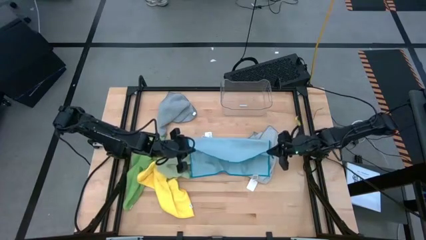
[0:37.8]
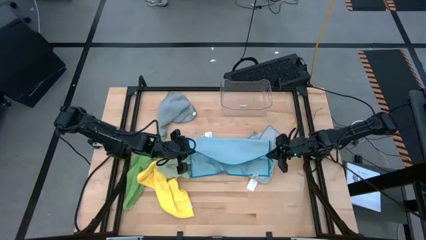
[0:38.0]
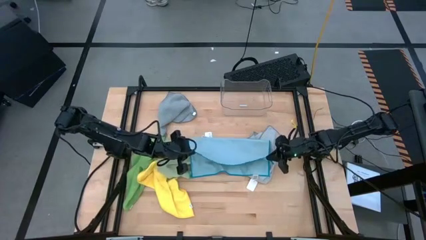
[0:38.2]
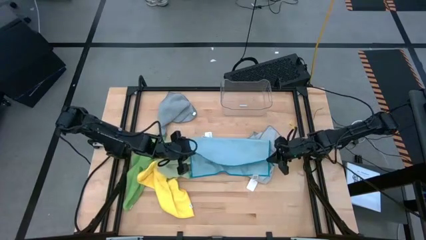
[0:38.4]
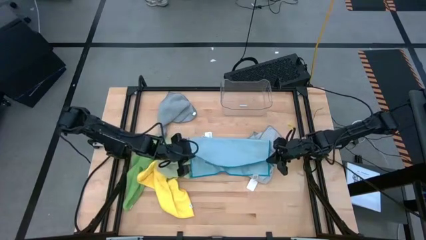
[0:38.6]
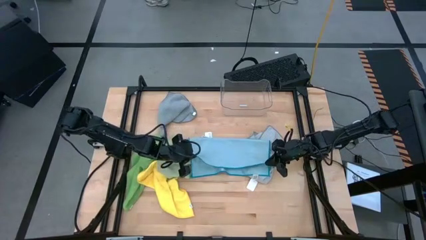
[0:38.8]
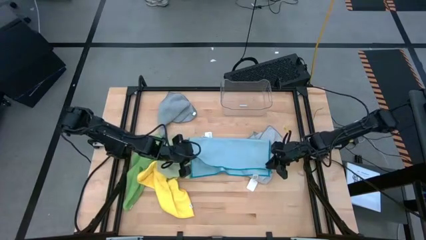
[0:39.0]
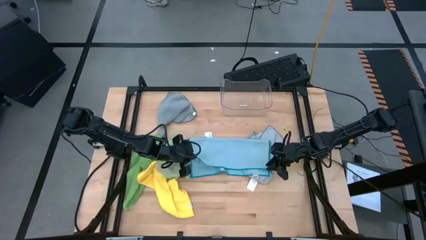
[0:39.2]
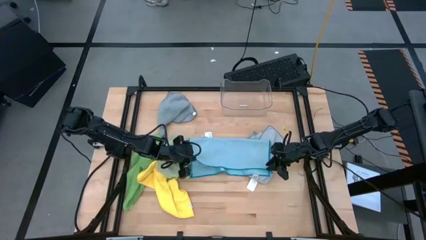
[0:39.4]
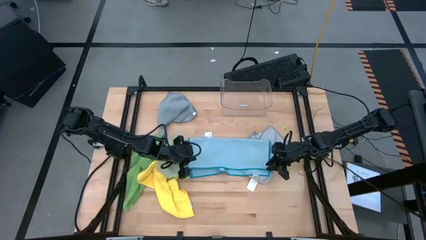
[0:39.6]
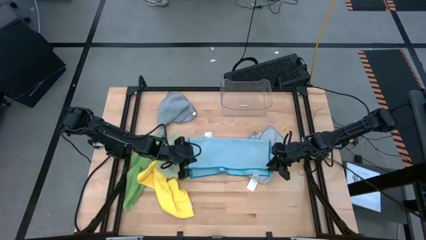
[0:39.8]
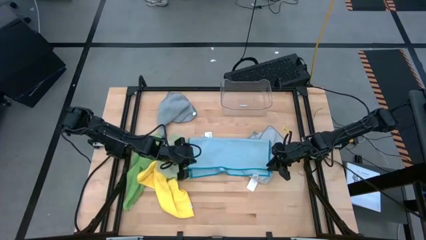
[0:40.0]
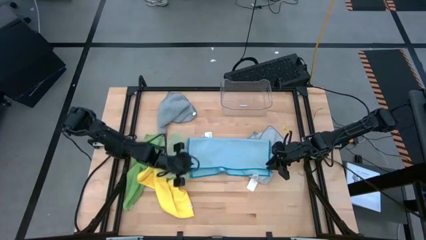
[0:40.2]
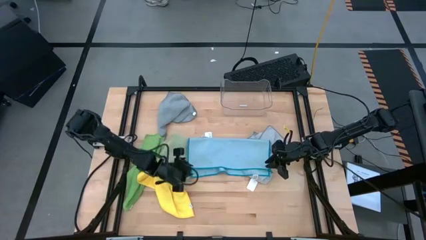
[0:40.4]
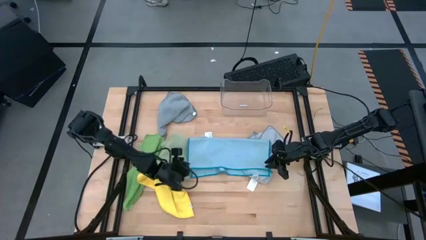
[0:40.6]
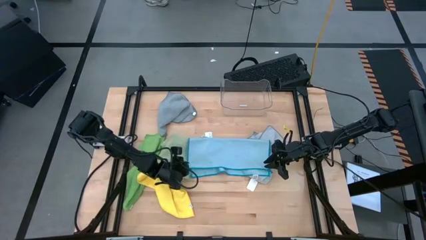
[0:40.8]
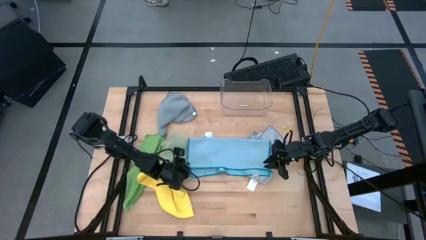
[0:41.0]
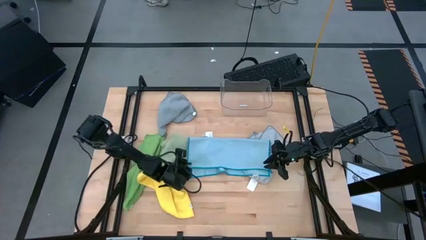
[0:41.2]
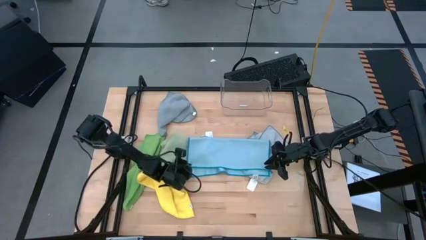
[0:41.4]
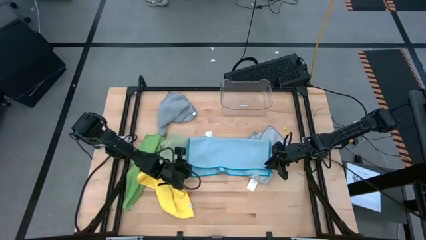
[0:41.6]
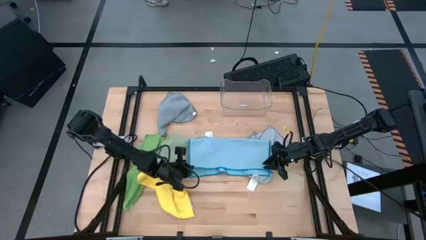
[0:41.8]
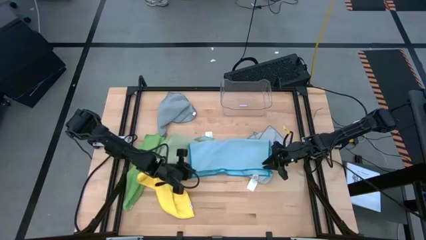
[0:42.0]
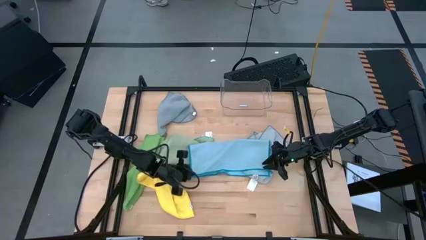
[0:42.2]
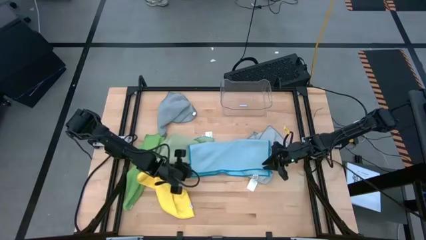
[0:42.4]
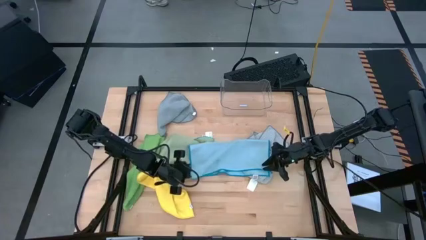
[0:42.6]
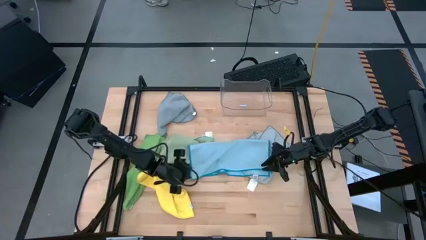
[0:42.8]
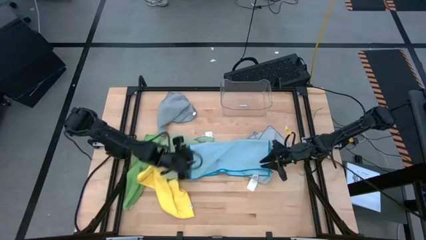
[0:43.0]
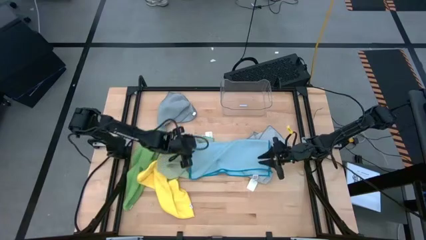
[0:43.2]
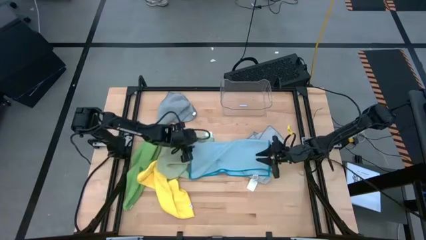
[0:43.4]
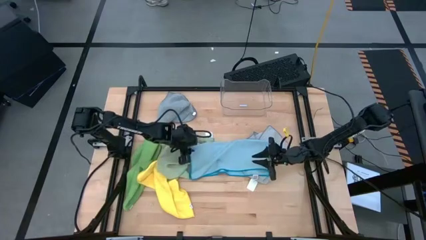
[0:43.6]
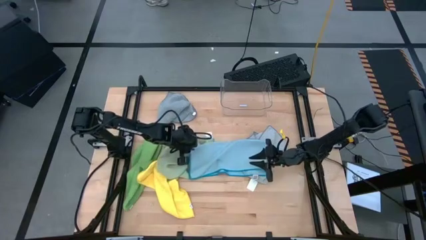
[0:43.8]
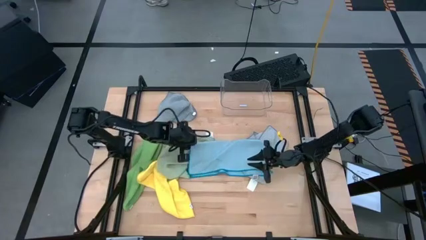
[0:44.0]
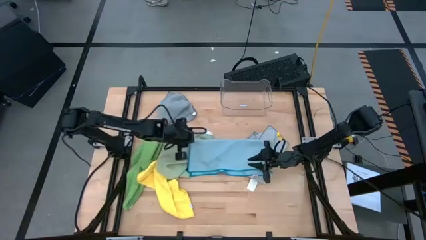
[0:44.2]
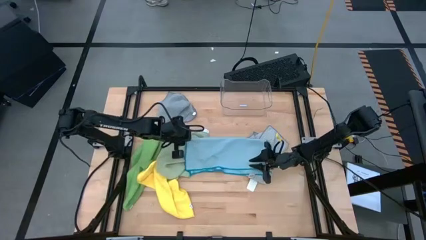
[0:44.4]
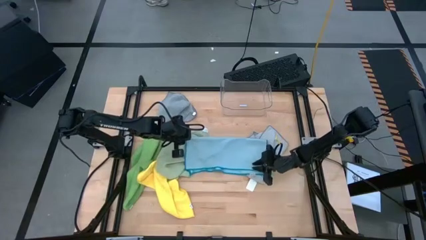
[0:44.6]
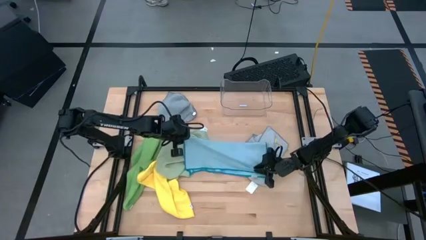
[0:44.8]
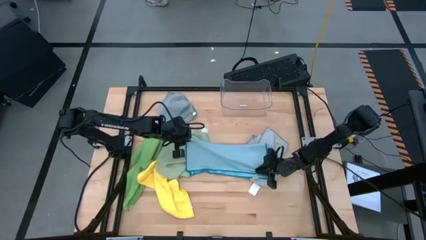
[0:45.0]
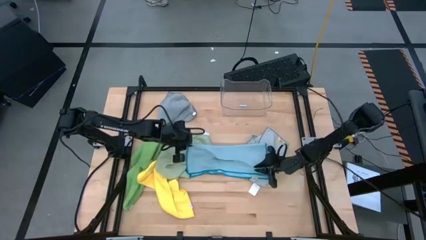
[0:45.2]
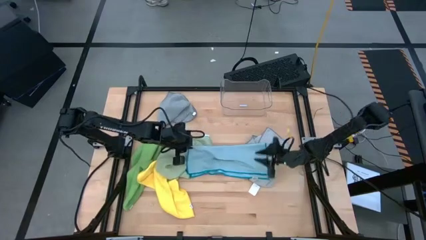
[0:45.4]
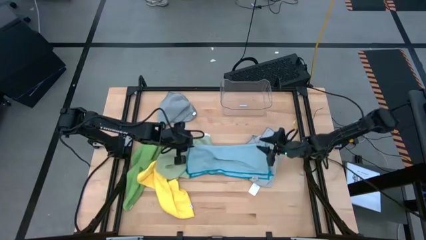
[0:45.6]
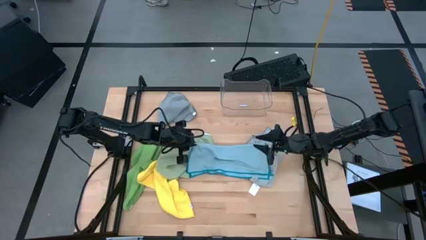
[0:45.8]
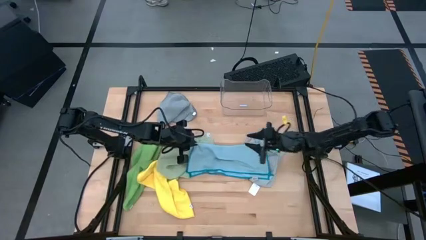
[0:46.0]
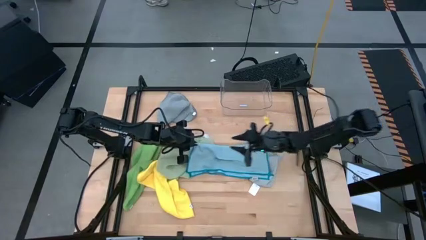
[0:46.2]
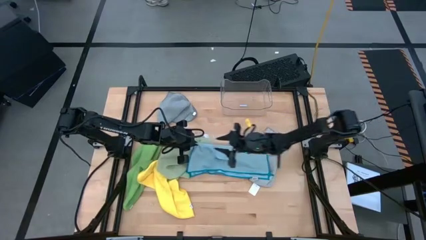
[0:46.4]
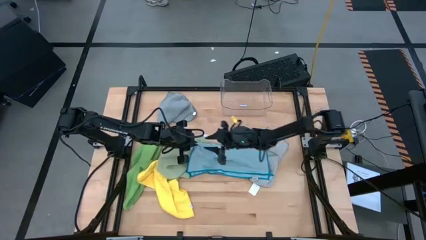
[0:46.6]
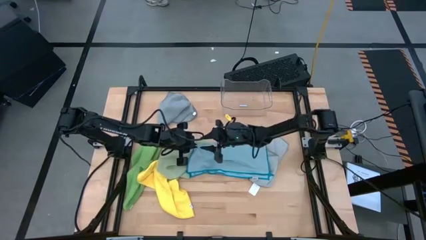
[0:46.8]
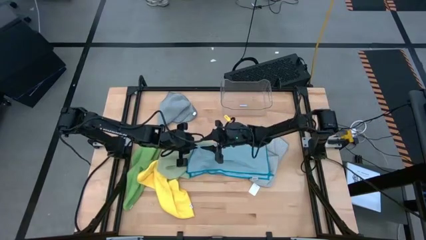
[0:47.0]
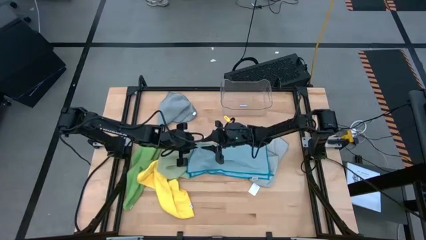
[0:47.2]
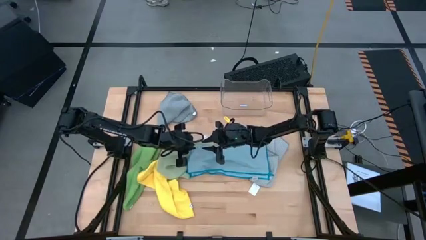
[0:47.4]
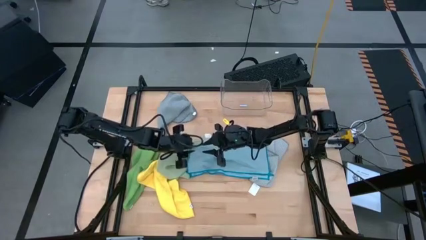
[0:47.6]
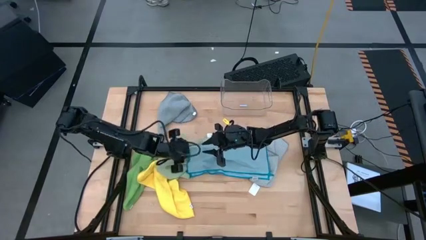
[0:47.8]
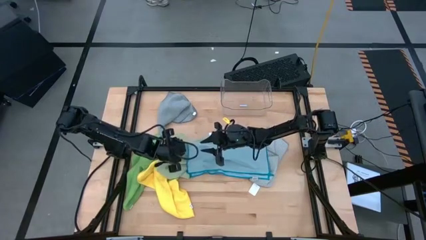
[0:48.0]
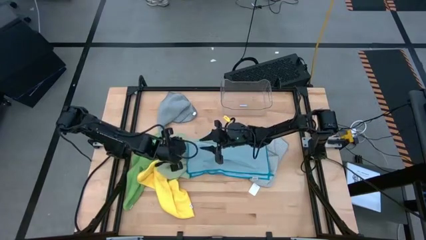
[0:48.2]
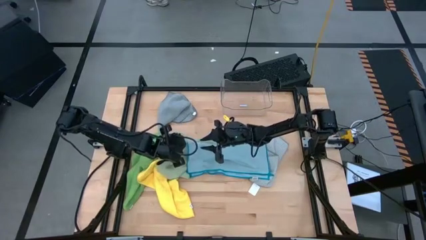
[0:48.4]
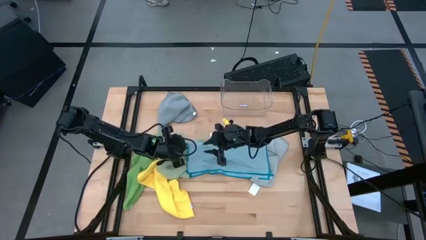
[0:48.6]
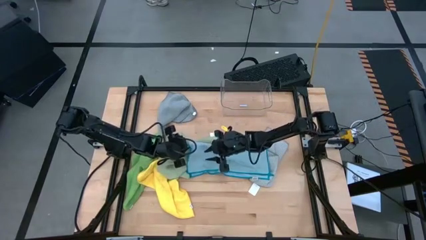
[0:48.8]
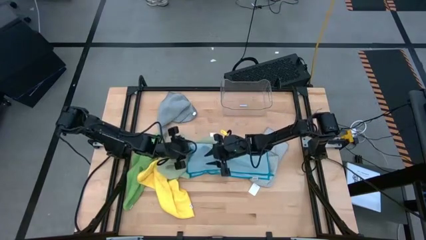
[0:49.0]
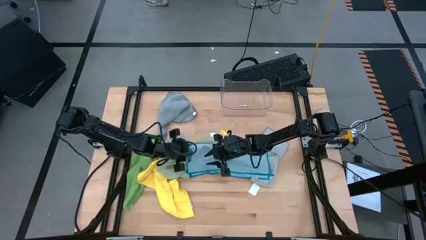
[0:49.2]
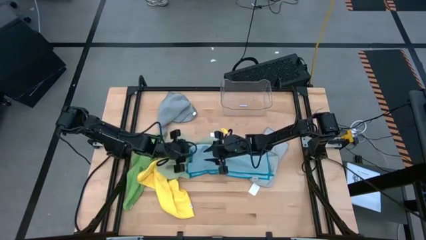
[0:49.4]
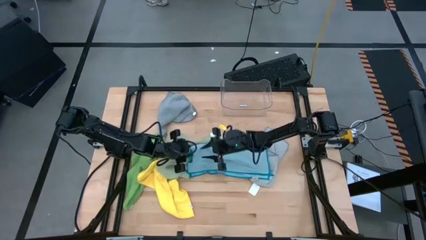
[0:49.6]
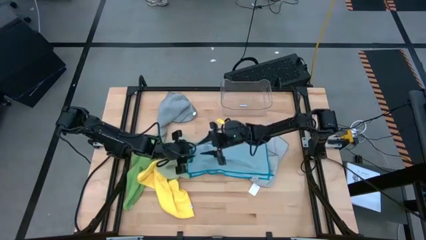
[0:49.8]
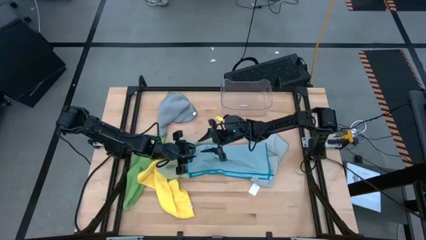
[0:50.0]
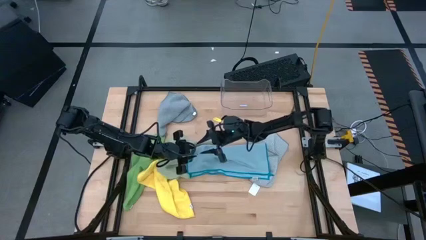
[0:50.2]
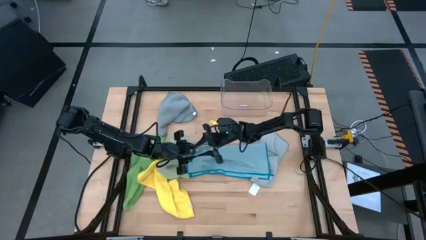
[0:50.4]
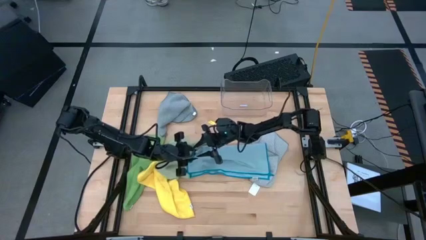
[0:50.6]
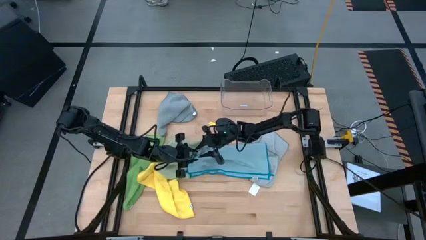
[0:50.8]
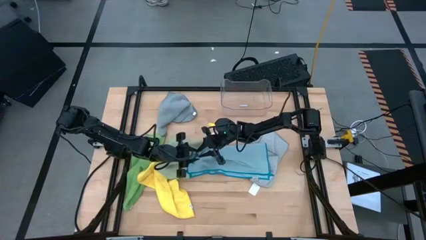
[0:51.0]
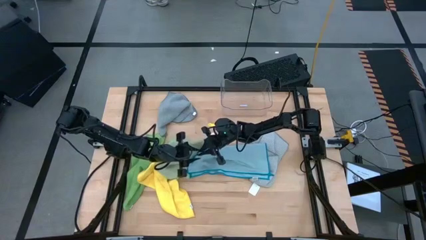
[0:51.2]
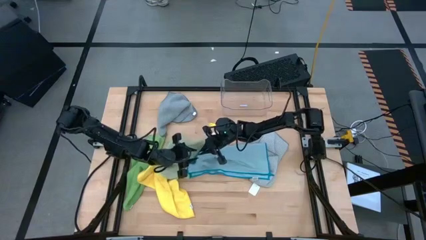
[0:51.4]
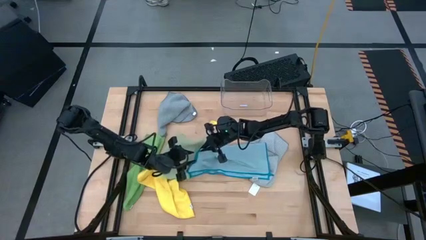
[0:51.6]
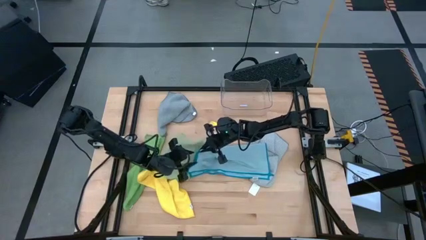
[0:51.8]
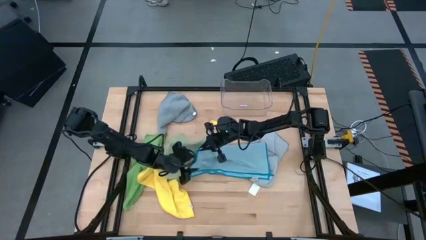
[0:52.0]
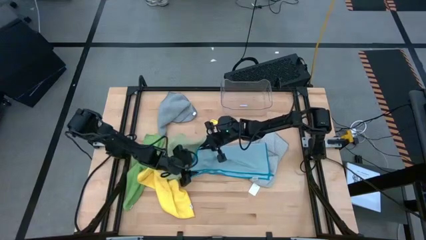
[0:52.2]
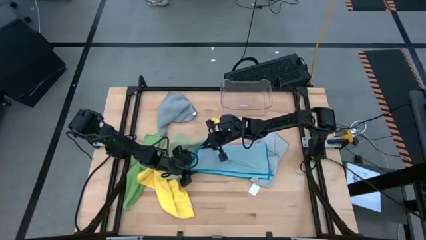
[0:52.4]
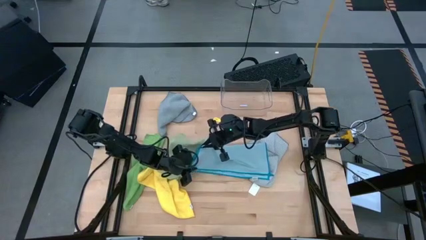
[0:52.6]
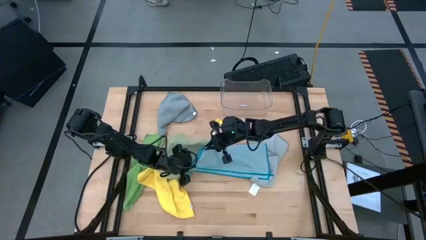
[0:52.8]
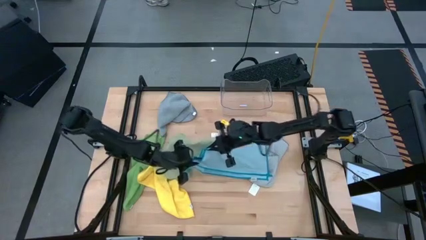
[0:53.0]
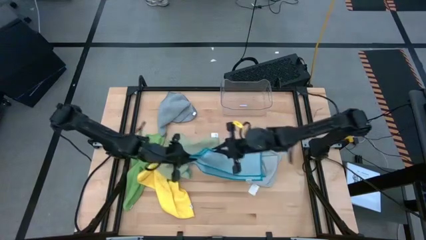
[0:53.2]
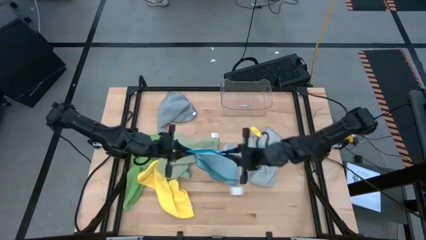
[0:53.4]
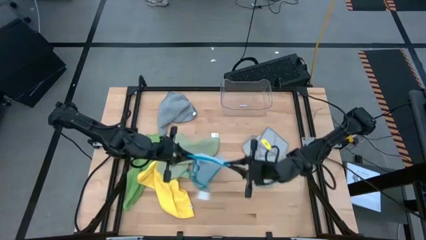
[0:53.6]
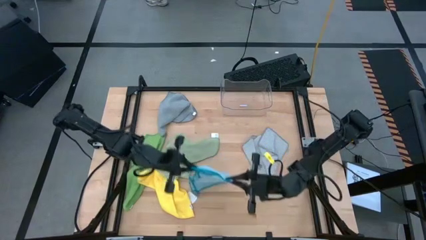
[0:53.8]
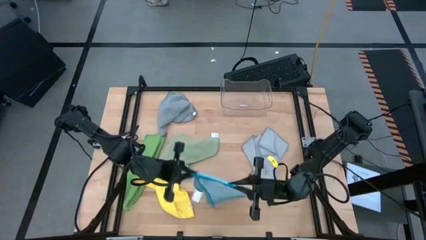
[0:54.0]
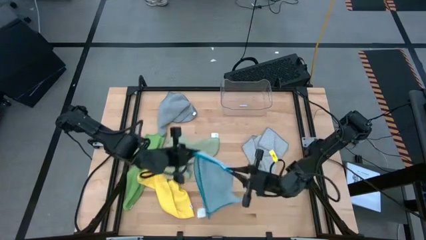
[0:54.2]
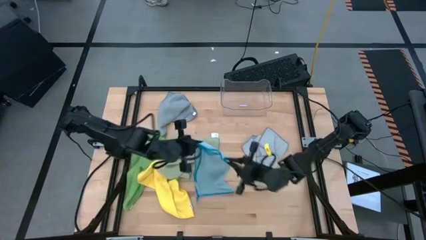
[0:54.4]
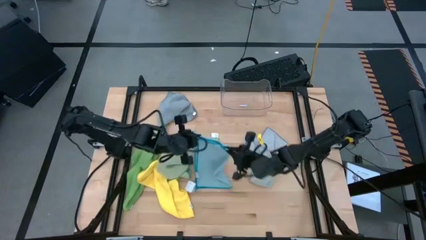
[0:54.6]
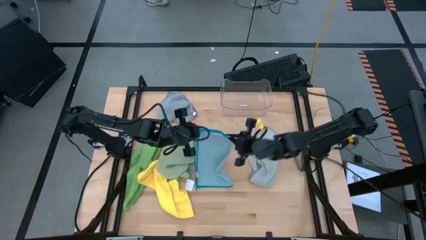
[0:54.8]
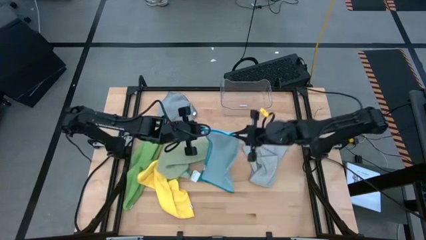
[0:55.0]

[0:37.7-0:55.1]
Task: Fold microfiber towels
Fold the blue towel
